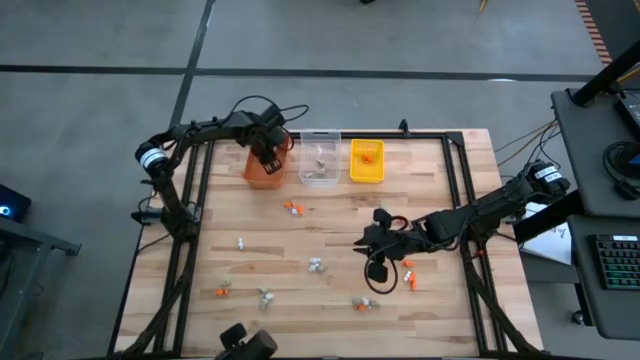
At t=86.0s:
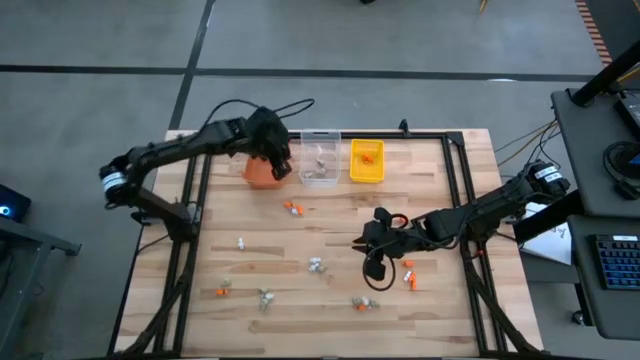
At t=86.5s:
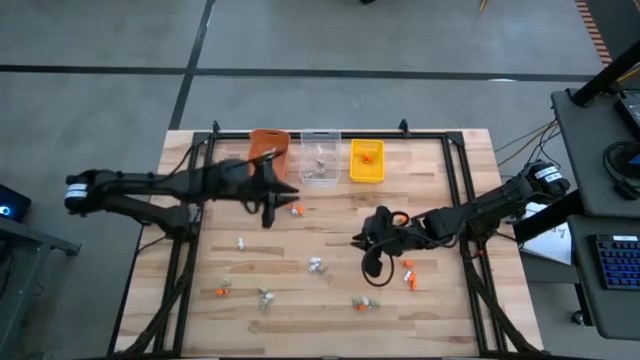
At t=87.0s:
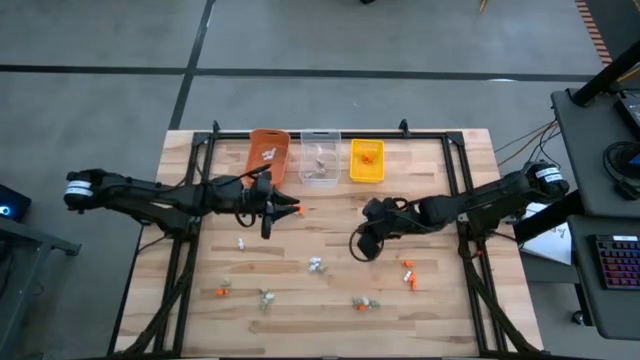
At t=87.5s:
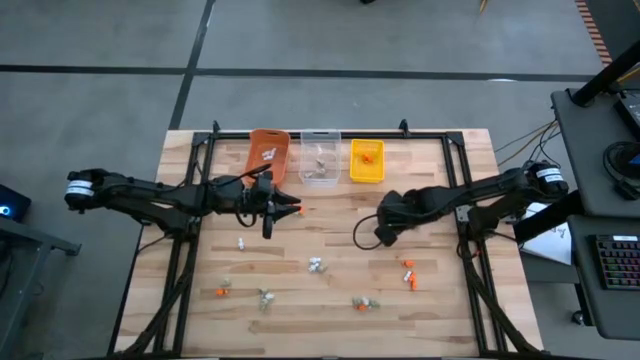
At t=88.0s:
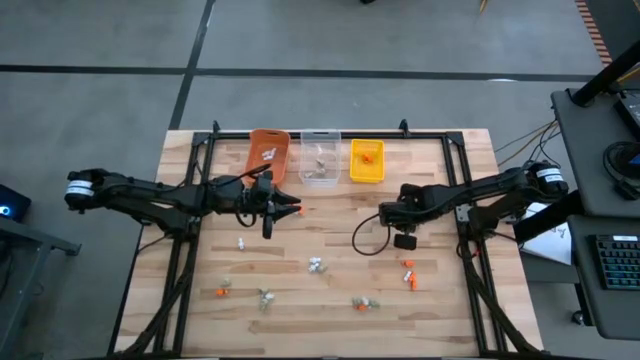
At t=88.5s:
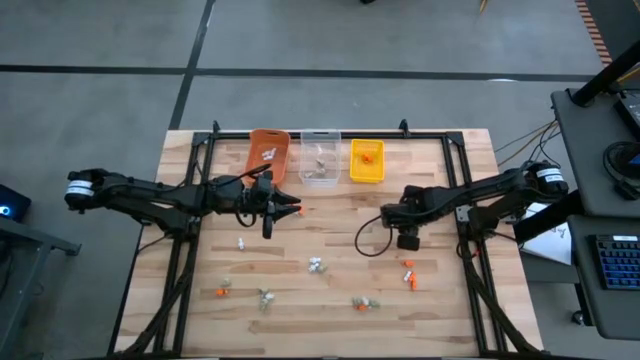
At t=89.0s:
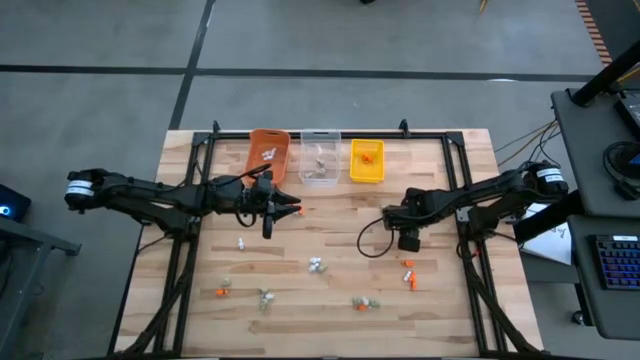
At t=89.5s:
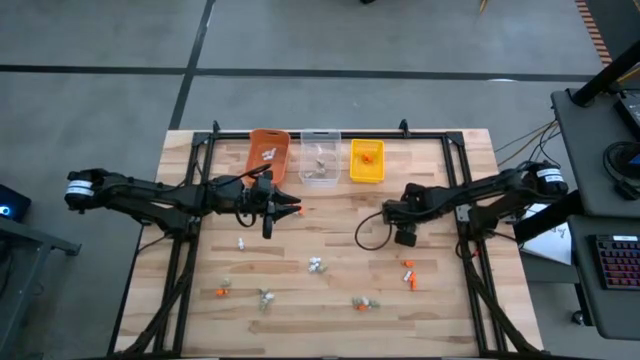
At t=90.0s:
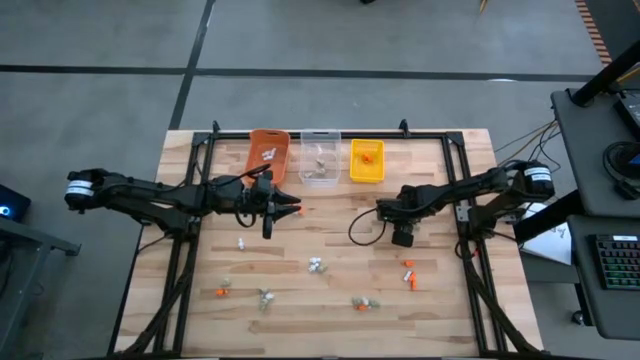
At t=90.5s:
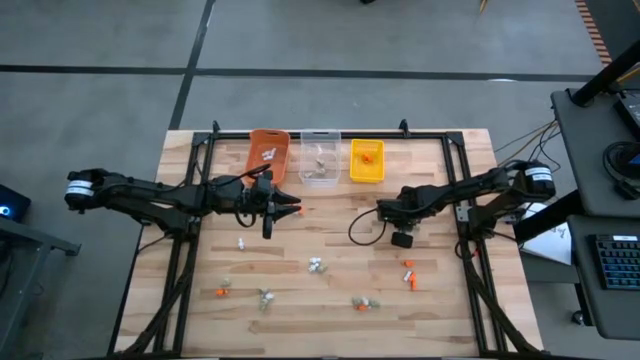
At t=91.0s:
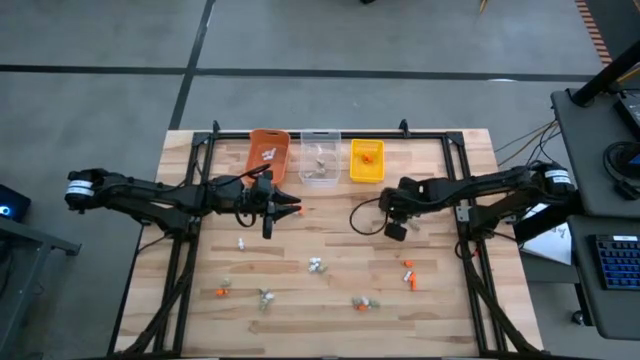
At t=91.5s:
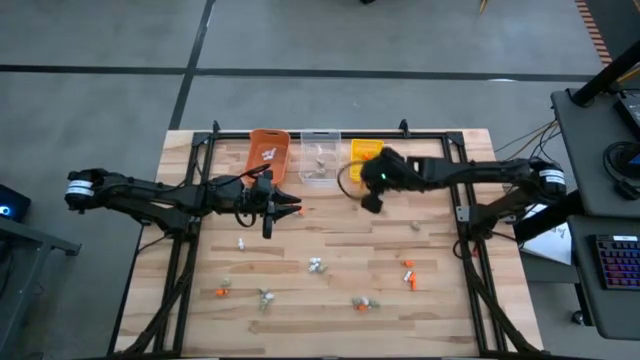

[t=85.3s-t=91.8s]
Task: Sort Halloween decoration
Put the orange skeleton toy into the yellow bin

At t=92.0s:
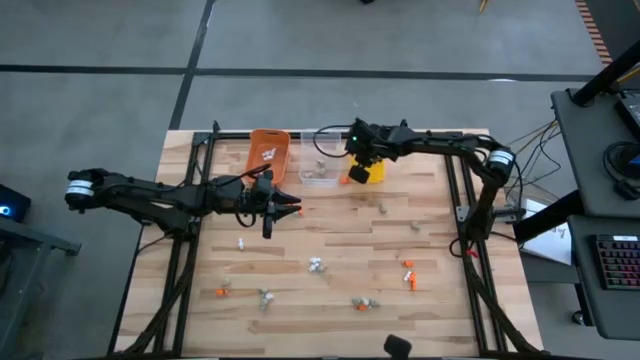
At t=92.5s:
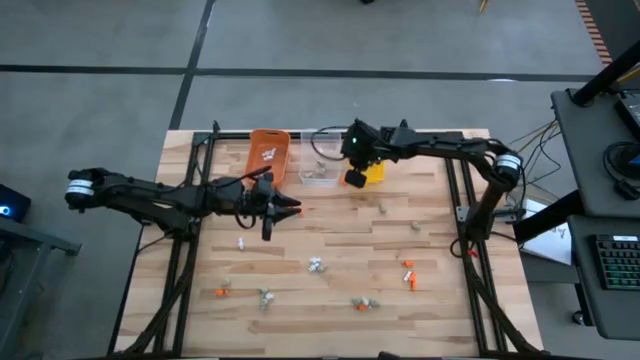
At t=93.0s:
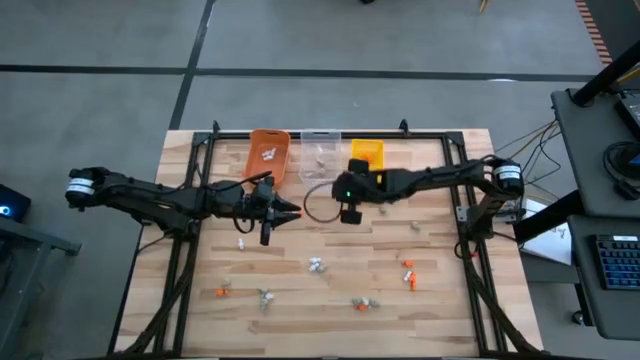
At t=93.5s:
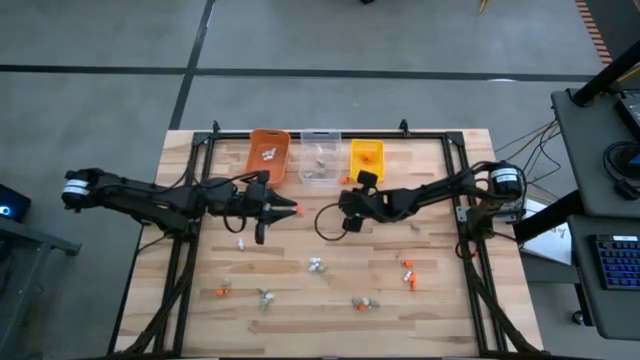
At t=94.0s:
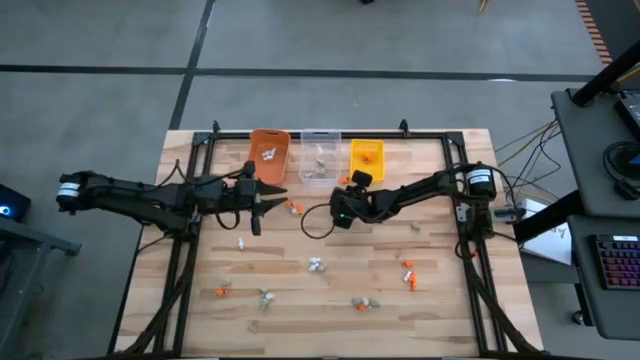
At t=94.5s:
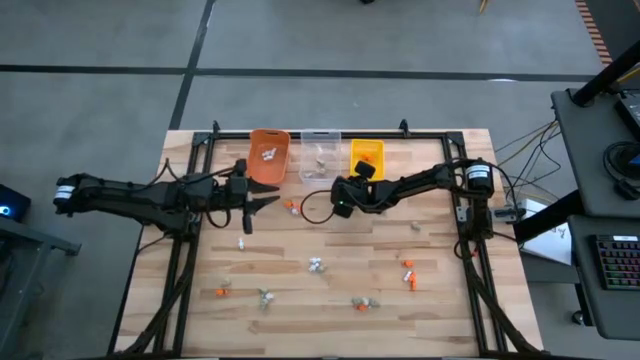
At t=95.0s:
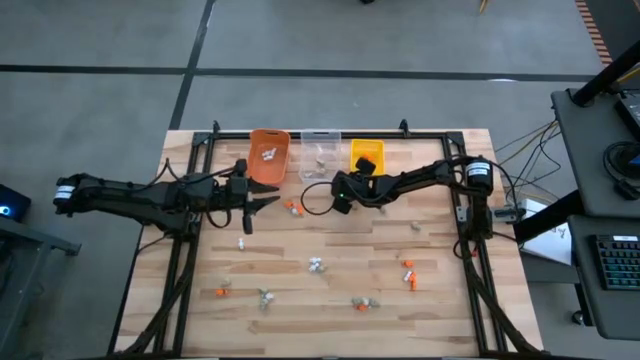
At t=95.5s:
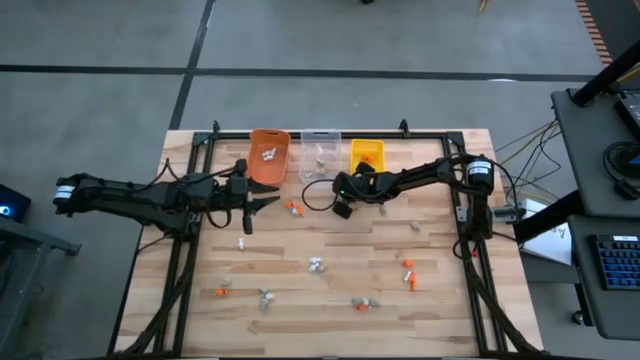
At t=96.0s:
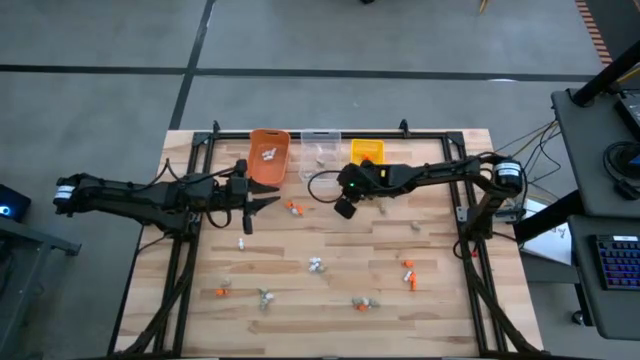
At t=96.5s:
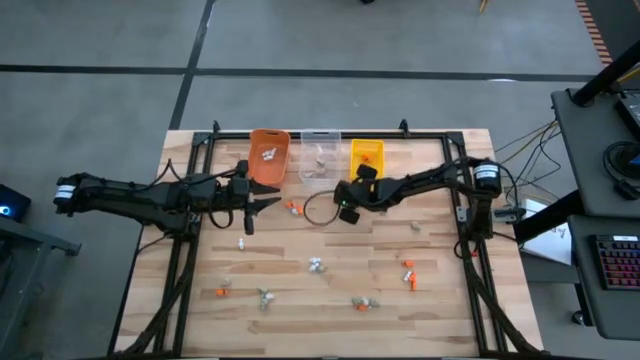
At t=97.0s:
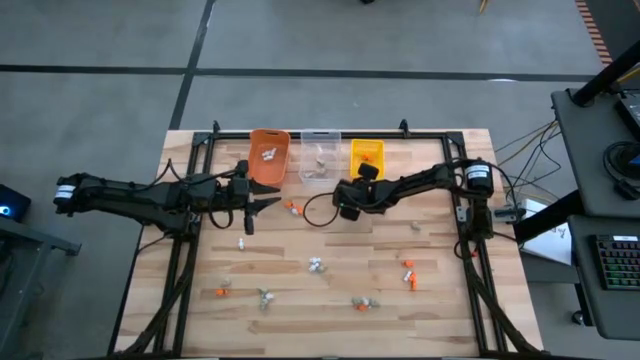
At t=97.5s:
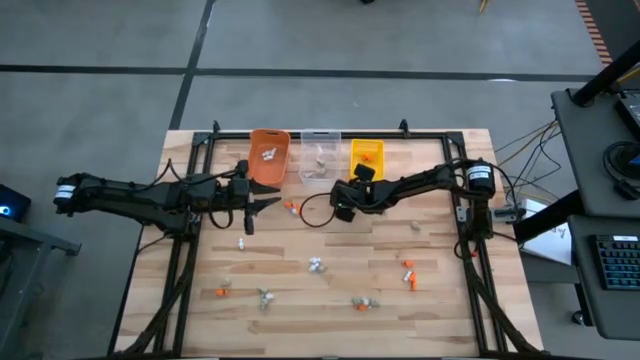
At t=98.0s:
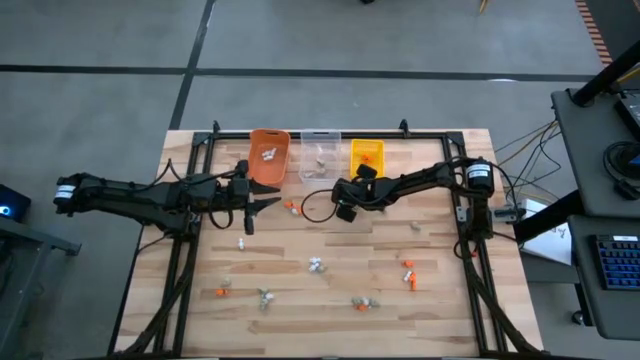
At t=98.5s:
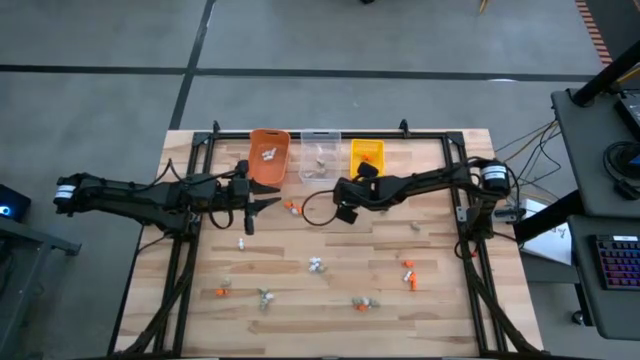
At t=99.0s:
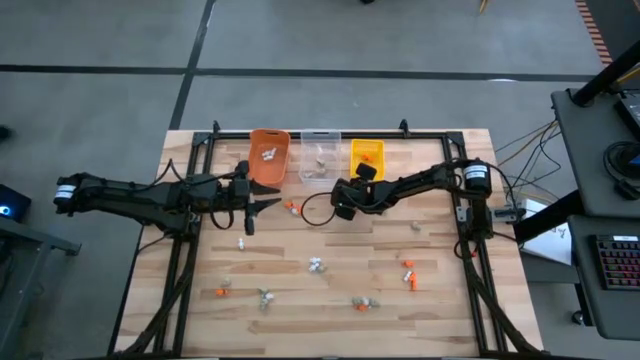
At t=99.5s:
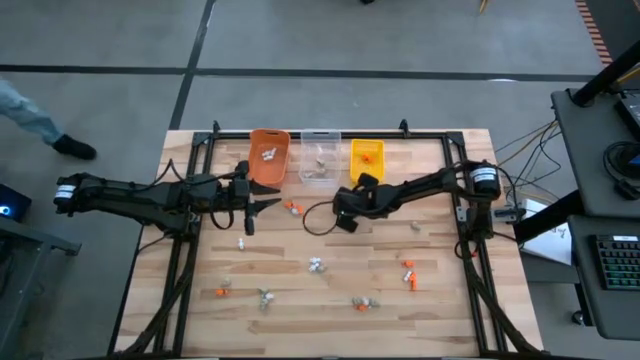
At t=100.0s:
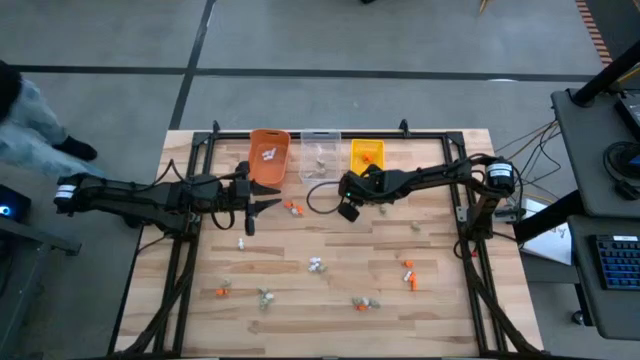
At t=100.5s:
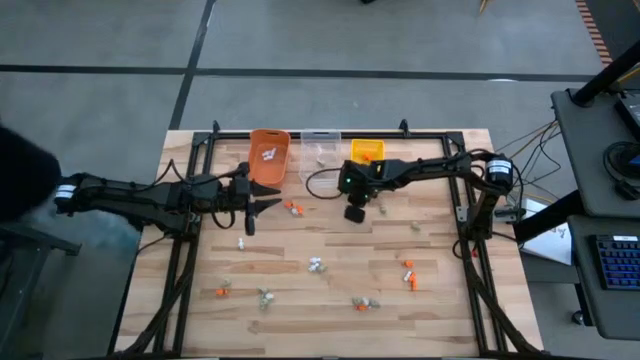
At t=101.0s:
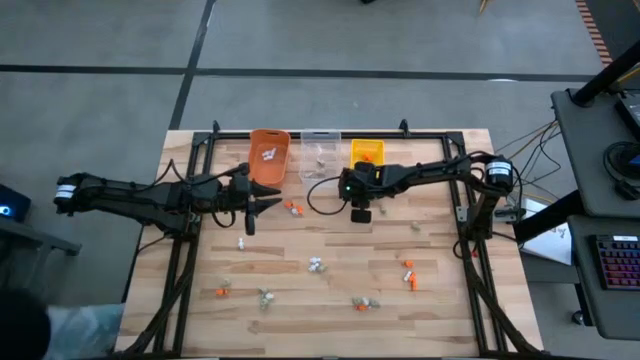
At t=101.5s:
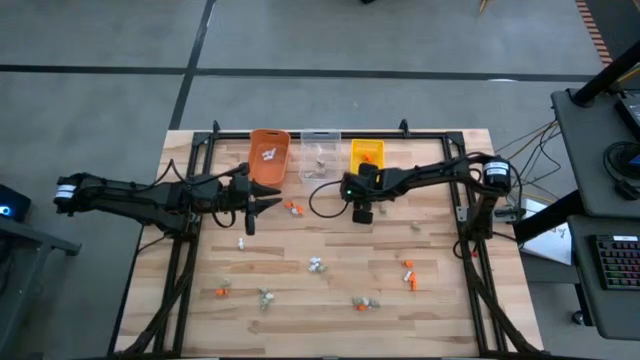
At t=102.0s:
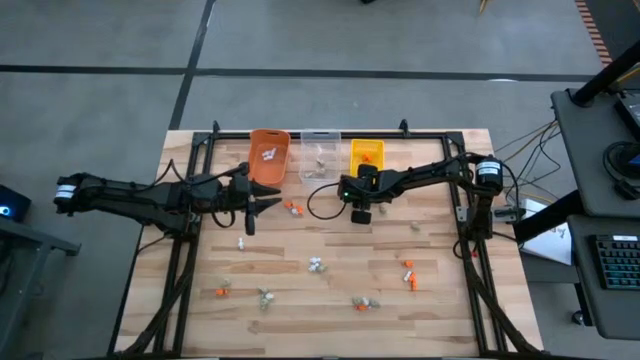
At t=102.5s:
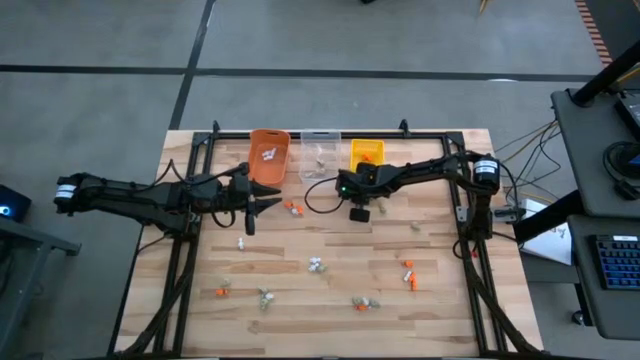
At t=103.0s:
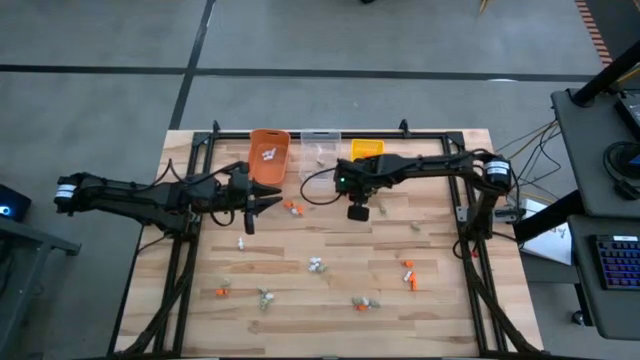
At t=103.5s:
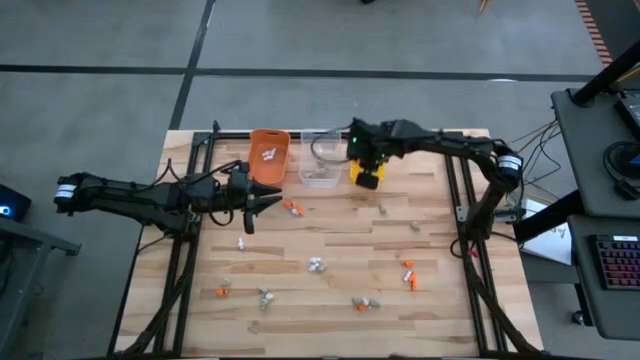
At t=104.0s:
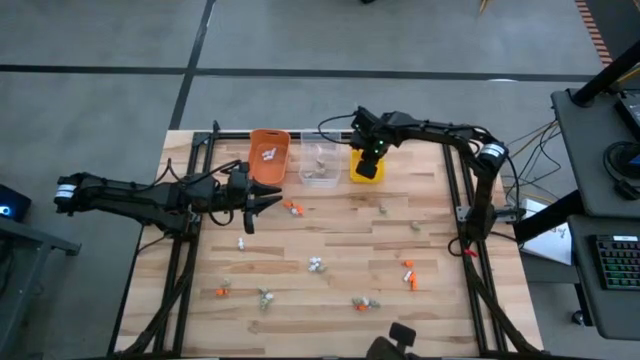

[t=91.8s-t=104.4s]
Put the orange skeleton toy into the yellow bin
